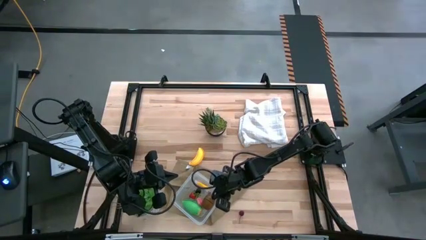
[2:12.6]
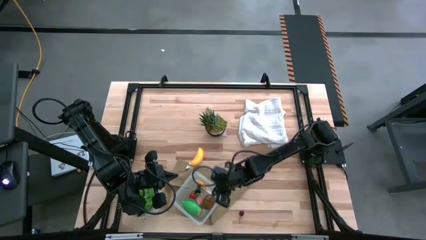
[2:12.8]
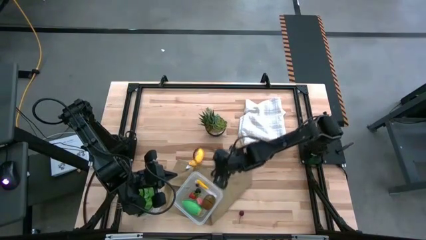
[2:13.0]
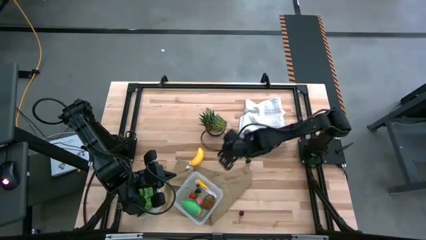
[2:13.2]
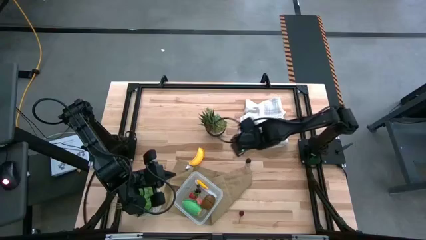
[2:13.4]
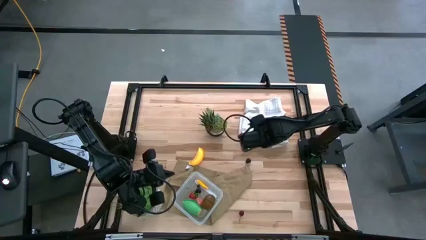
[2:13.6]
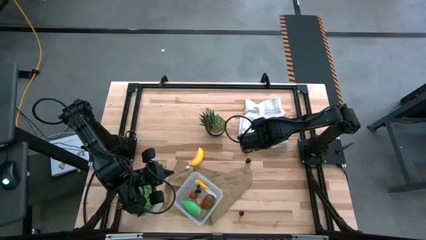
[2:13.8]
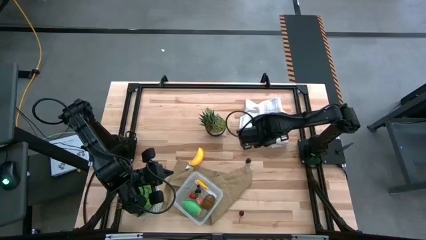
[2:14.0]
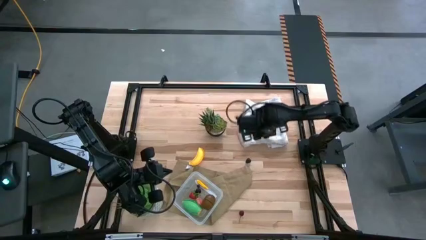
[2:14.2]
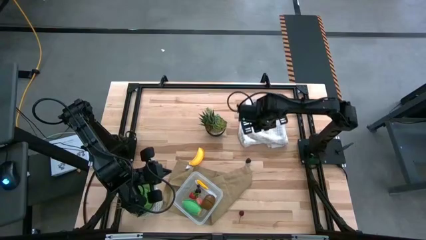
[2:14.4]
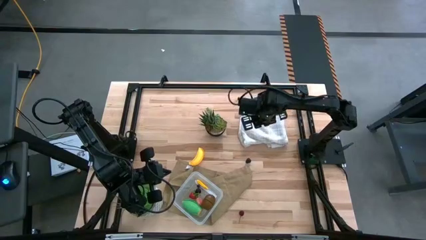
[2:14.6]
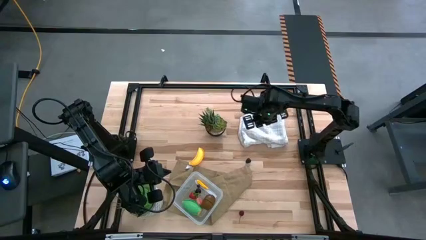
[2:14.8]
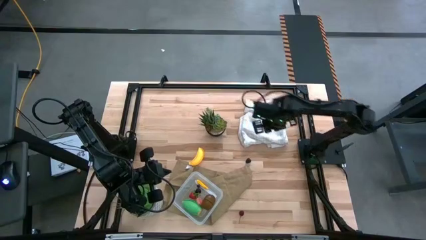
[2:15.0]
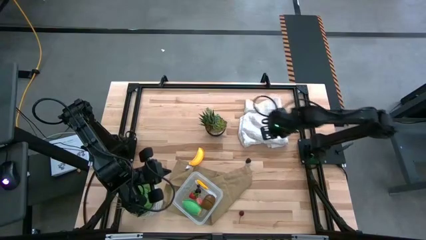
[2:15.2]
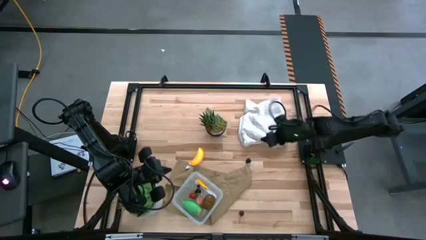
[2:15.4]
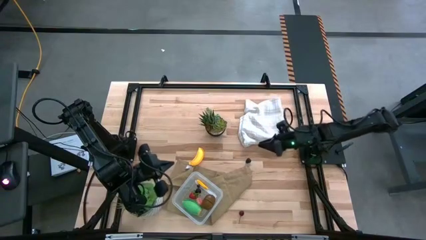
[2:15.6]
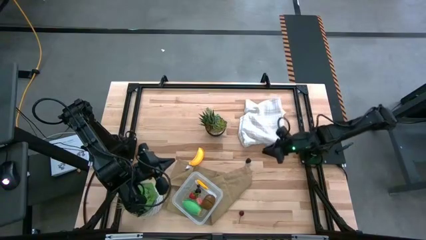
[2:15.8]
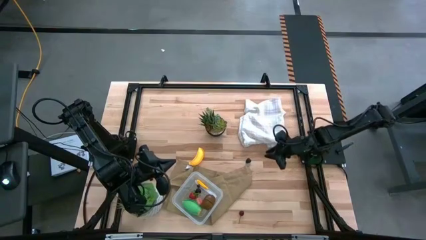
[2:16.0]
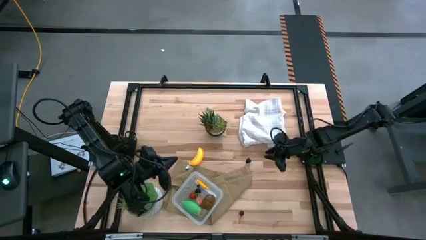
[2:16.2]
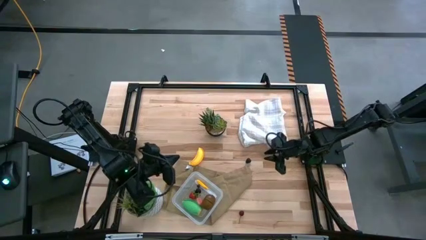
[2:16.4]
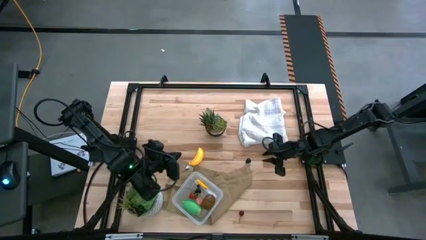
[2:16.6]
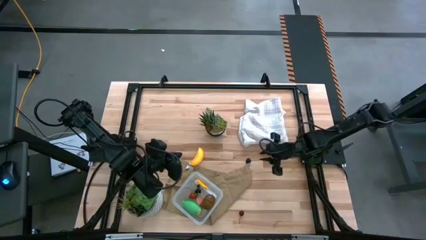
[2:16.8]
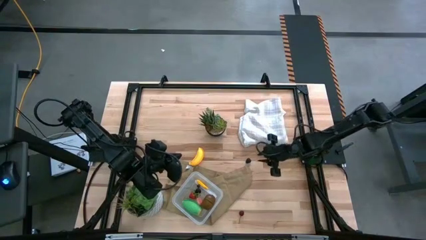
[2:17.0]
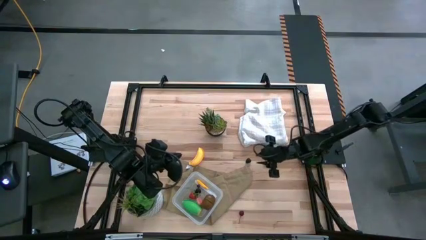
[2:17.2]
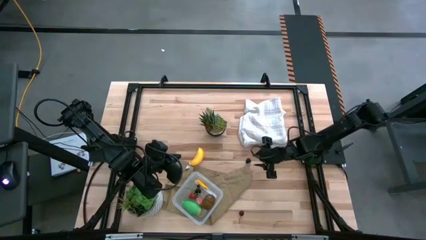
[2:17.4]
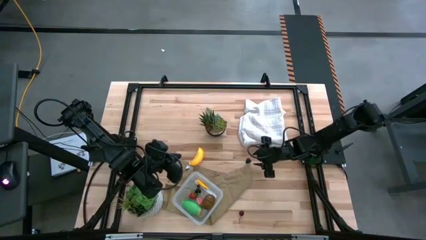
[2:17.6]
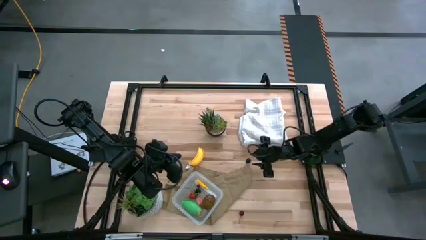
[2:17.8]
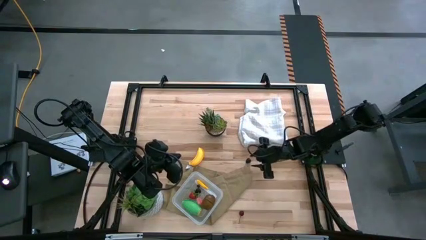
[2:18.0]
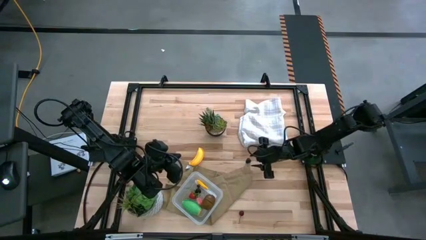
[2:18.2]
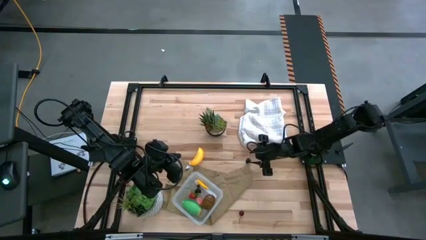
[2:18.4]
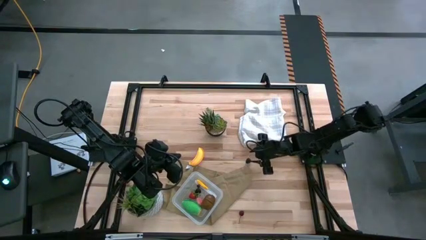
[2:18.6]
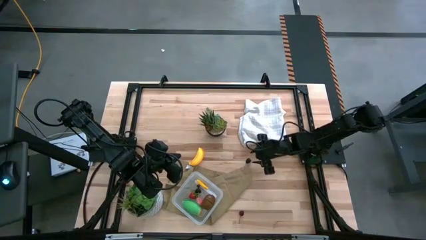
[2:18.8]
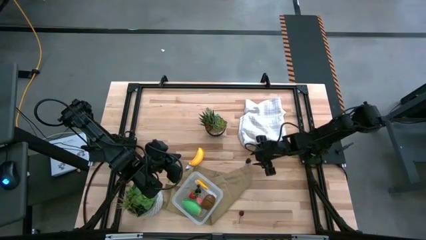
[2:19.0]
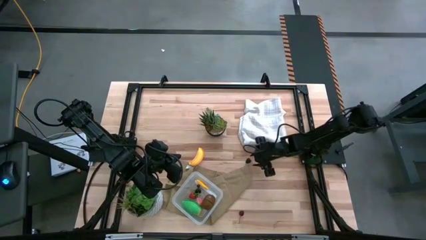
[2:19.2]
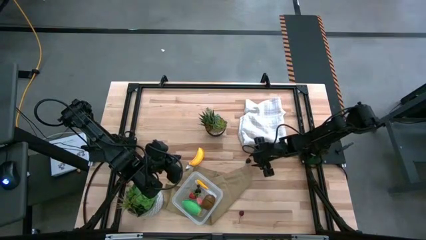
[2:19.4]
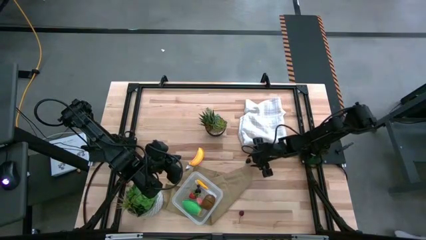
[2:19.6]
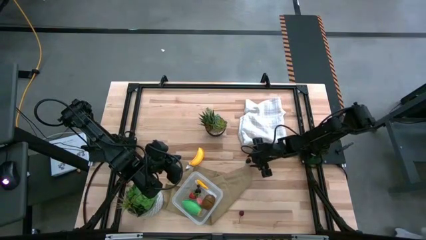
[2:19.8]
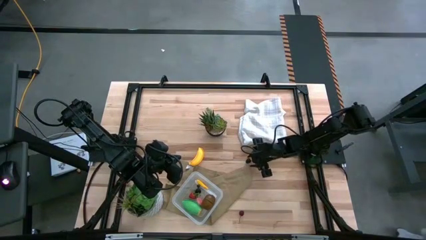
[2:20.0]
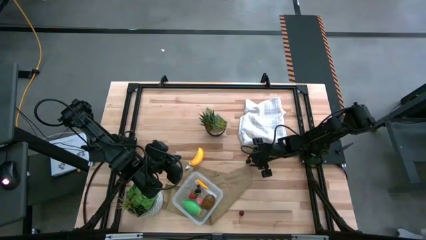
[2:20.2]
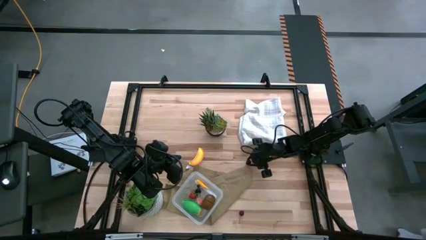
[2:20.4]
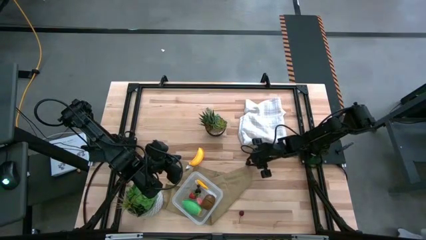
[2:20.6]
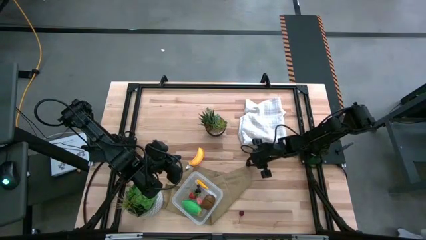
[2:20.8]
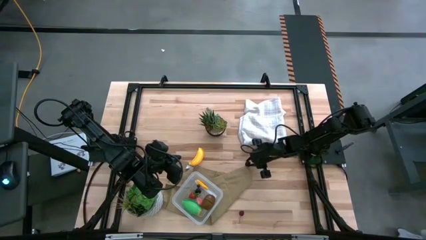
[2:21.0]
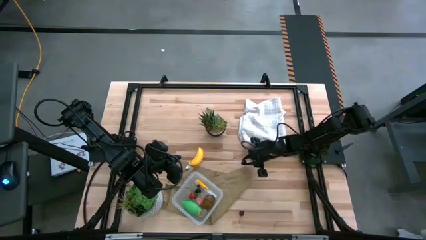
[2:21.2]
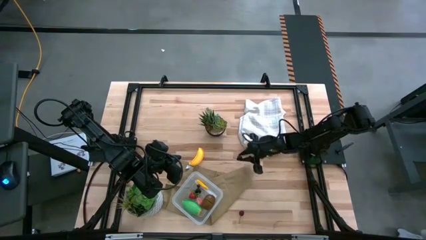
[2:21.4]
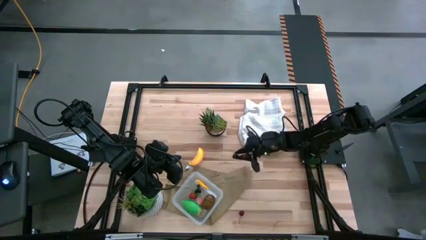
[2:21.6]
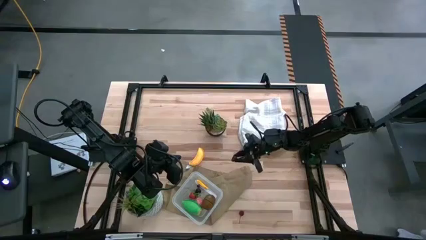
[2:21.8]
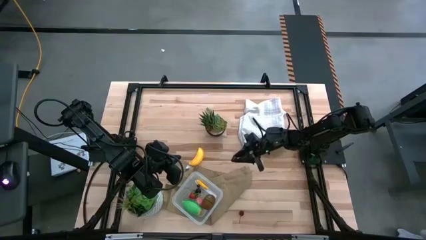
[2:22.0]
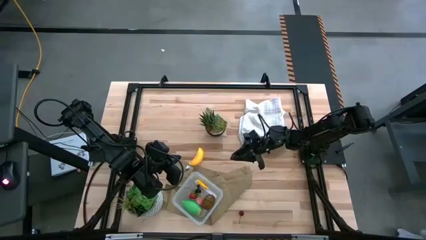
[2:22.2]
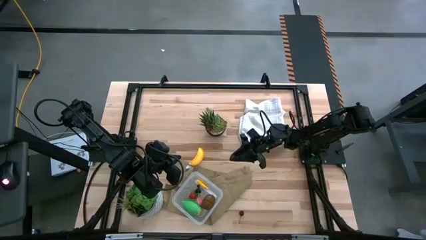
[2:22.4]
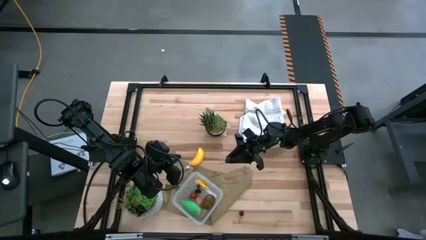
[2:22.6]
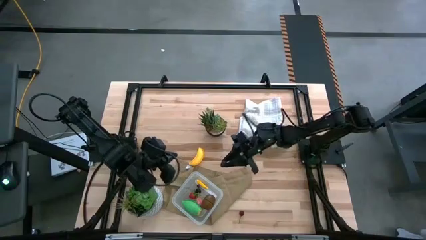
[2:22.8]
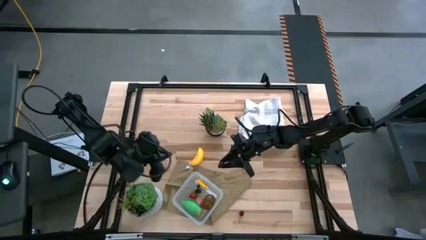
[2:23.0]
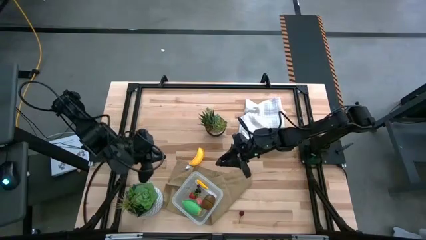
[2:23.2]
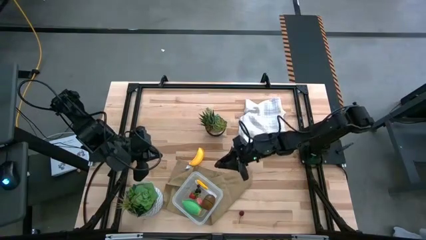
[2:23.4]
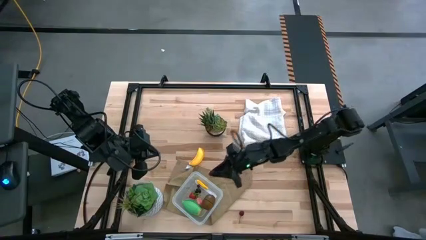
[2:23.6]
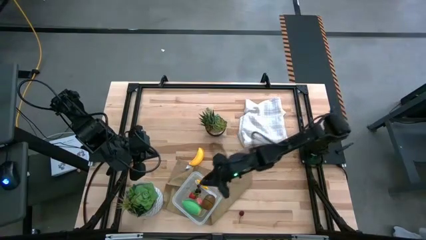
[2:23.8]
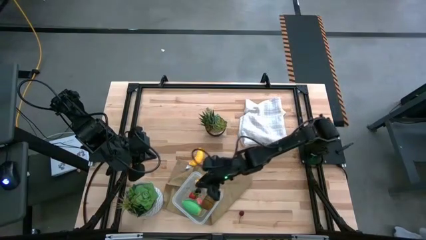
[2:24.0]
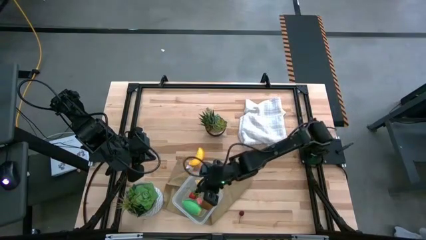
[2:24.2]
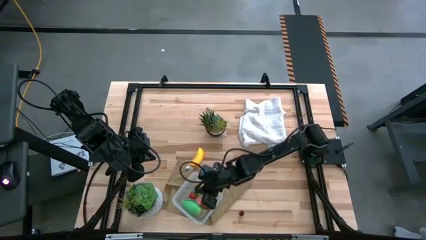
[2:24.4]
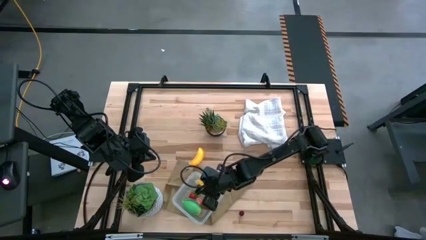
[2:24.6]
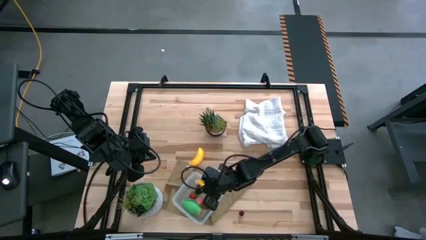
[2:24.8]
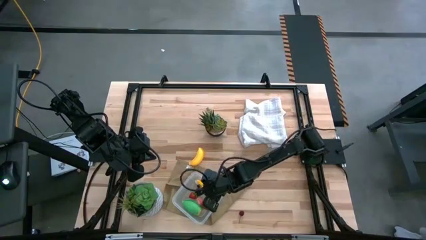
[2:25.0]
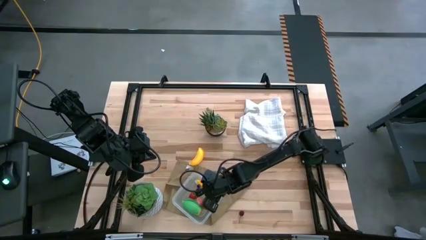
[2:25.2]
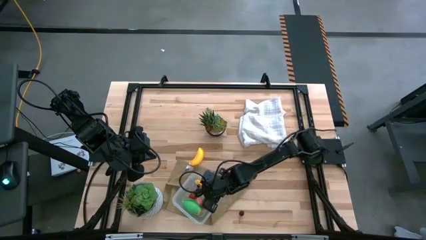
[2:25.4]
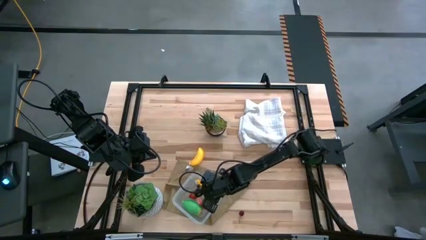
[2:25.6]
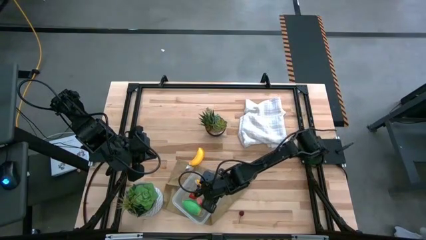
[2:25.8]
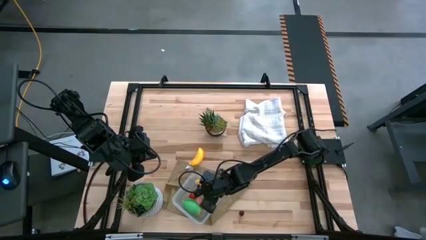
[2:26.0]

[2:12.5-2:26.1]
Task: Pick and placing Produce into tupperware
Put the blackberry into the container

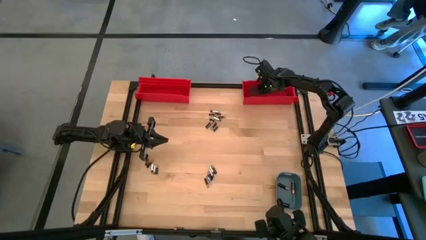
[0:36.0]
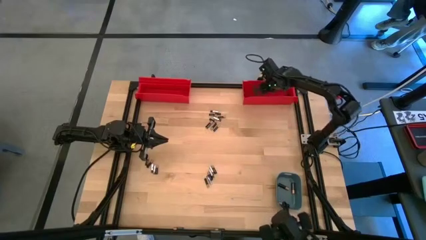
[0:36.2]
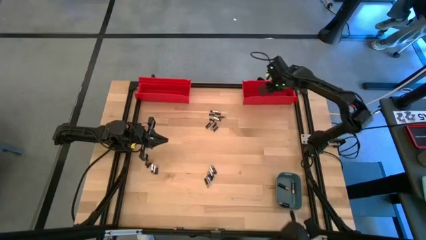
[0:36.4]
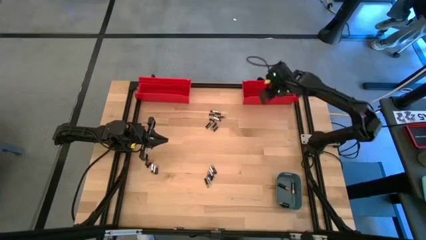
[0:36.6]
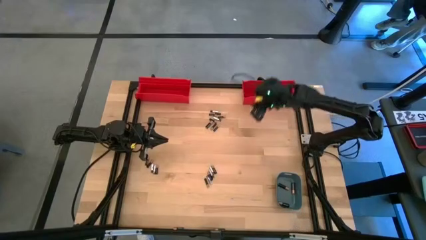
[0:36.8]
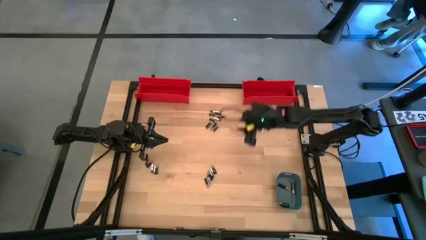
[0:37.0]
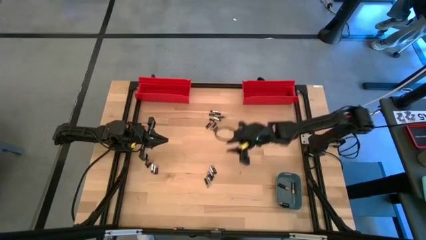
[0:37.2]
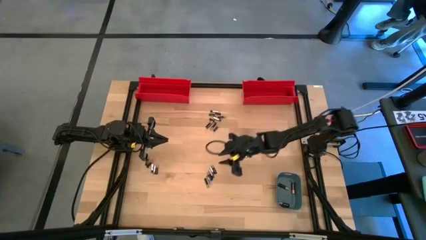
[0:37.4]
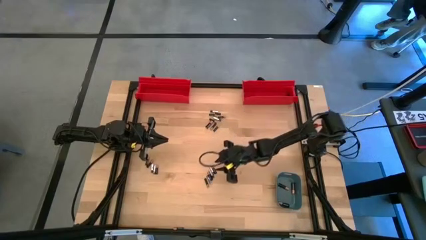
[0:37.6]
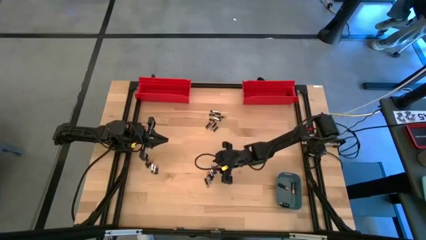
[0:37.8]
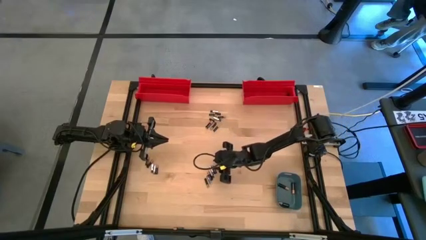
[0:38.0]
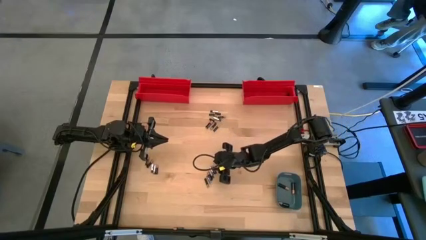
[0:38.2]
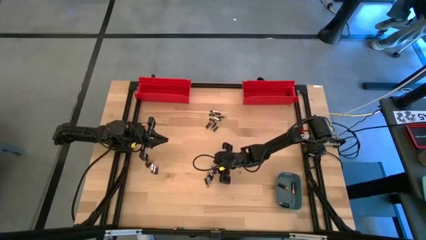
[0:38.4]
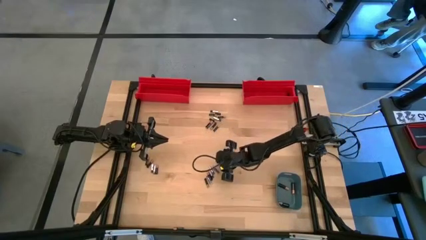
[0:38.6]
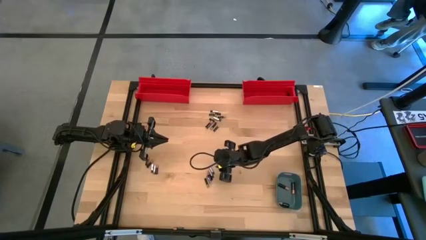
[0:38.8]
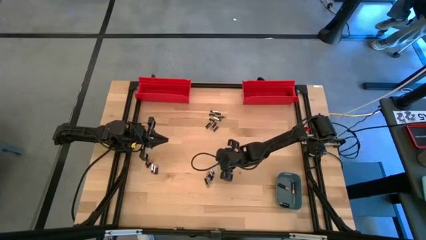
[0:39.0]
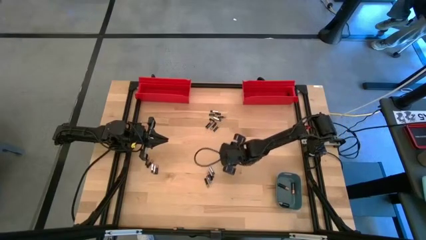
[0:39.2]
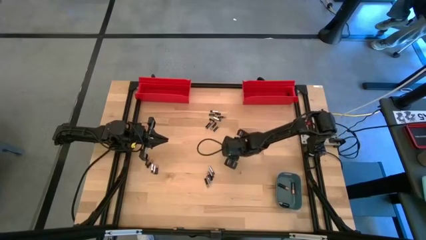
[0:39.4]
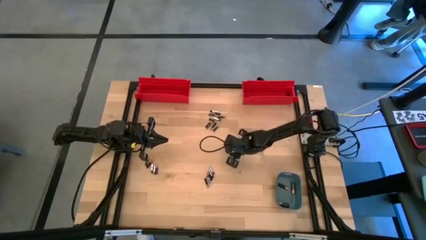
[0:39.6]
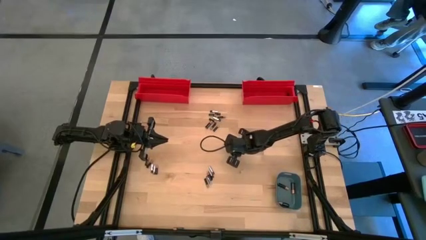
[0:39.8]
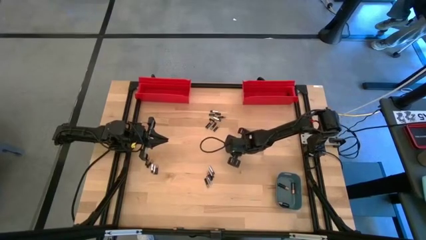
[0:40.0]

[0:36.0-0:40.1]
Task: Sort batteries
Put the small black battery into the right red bin
